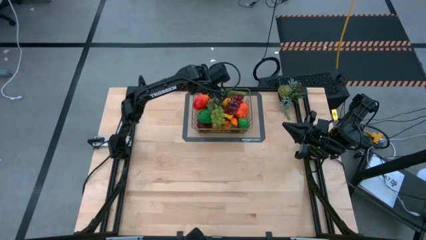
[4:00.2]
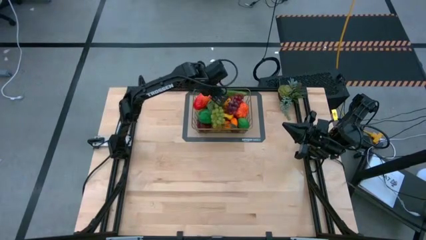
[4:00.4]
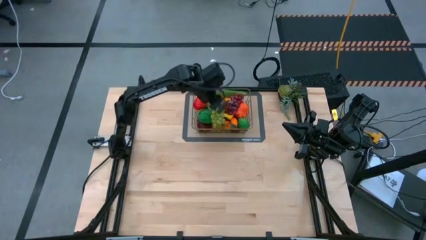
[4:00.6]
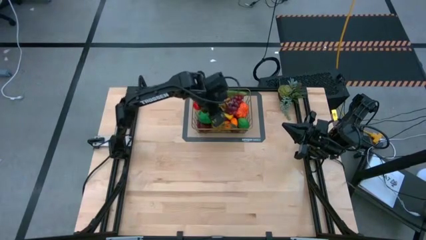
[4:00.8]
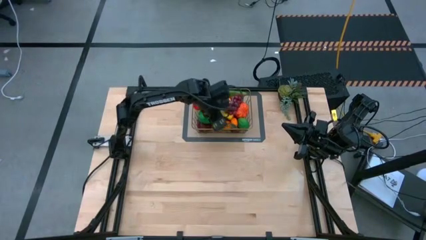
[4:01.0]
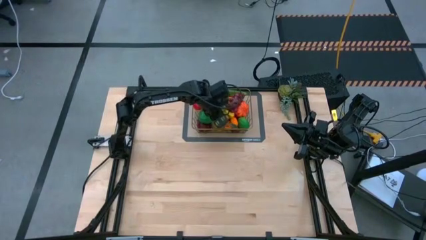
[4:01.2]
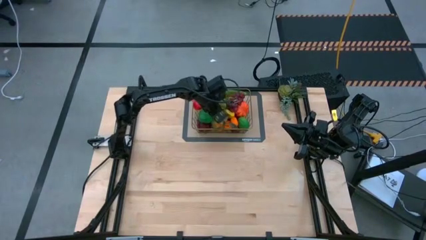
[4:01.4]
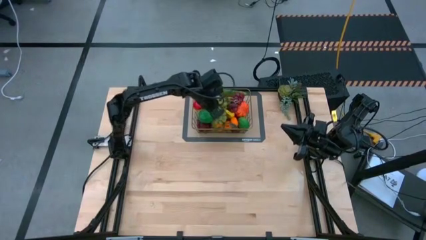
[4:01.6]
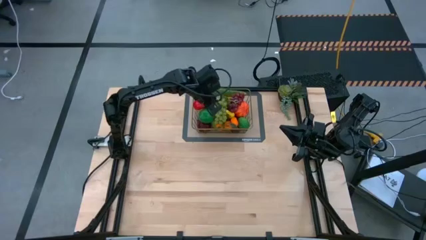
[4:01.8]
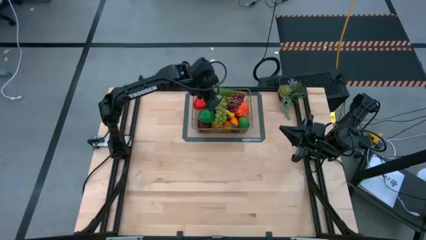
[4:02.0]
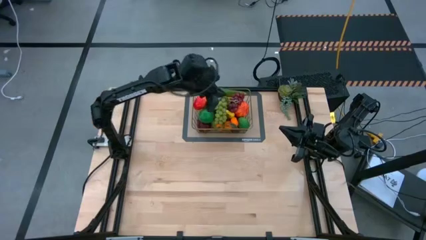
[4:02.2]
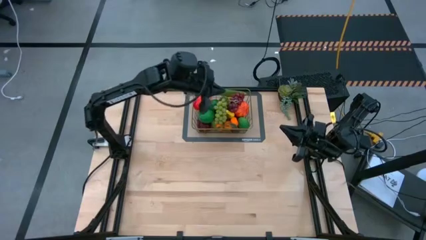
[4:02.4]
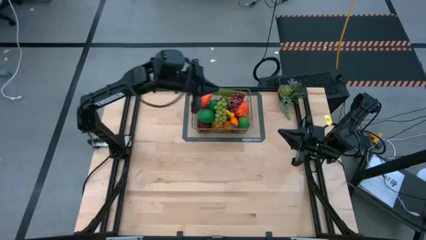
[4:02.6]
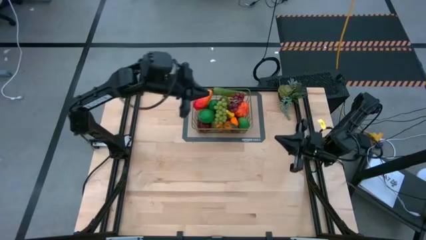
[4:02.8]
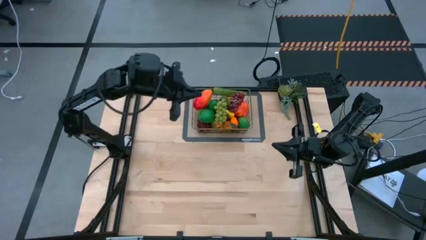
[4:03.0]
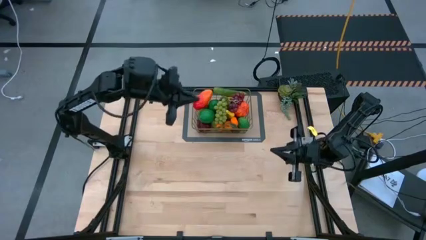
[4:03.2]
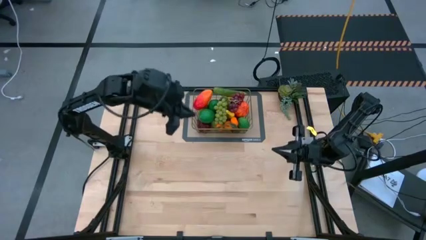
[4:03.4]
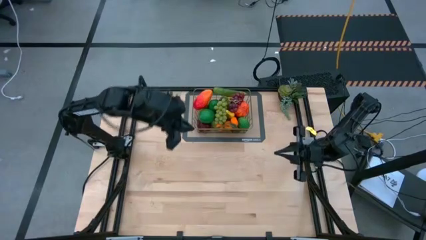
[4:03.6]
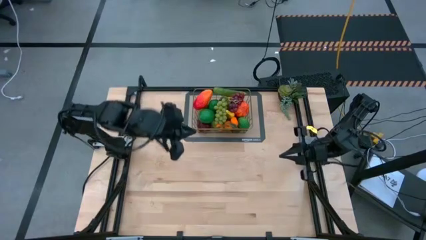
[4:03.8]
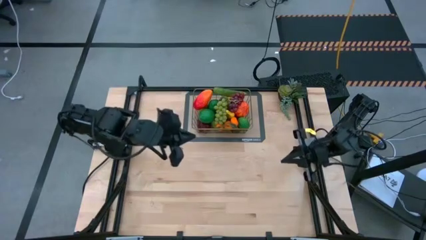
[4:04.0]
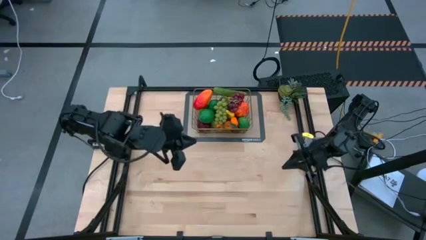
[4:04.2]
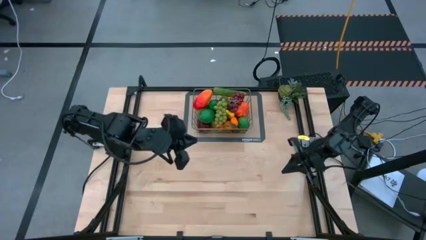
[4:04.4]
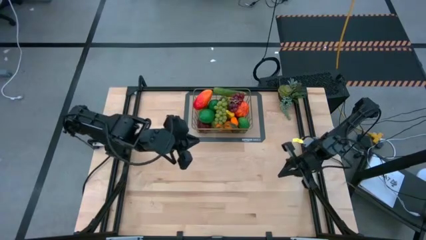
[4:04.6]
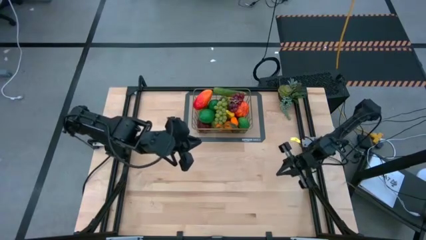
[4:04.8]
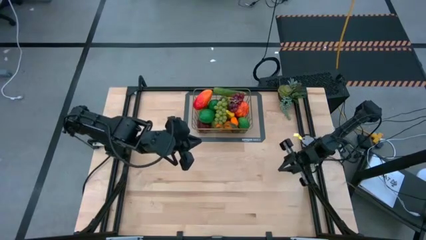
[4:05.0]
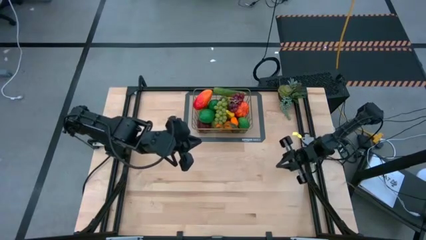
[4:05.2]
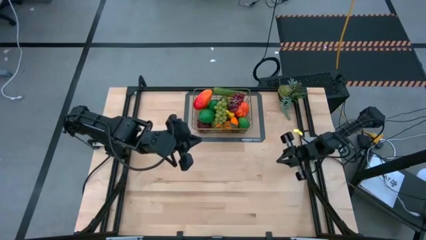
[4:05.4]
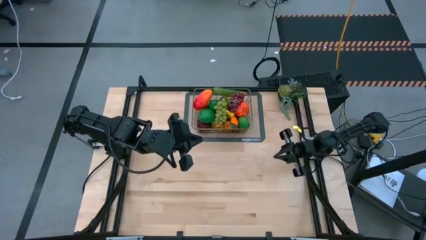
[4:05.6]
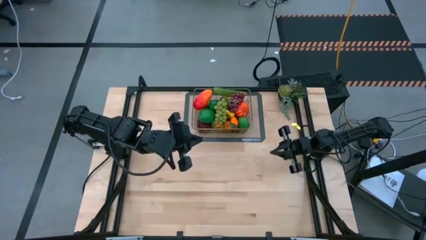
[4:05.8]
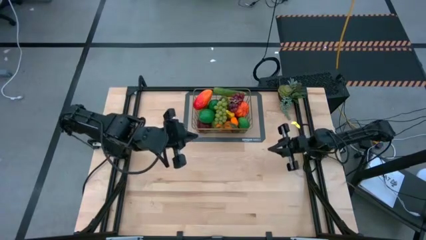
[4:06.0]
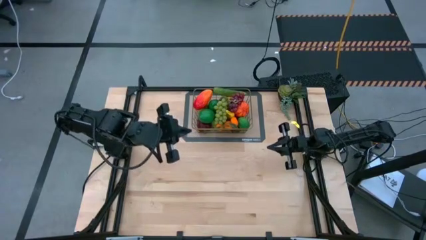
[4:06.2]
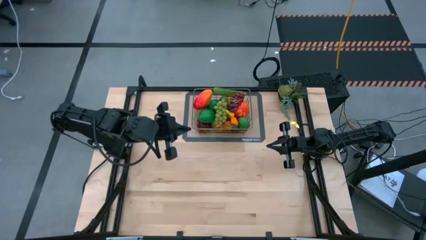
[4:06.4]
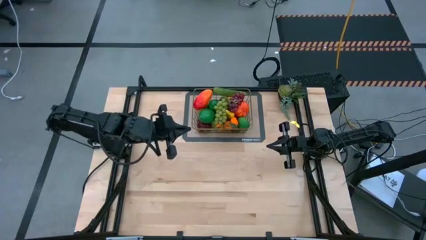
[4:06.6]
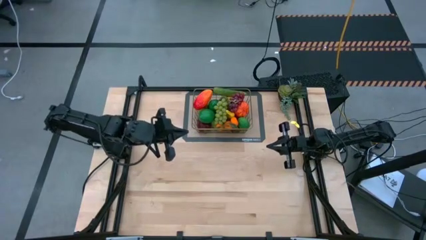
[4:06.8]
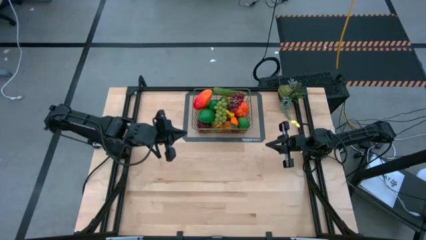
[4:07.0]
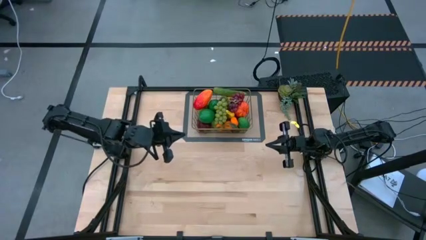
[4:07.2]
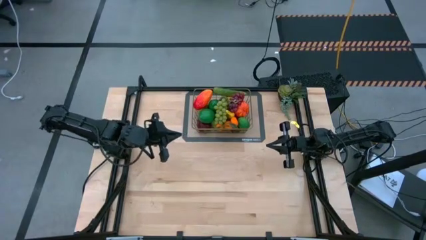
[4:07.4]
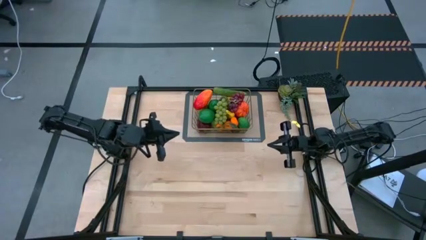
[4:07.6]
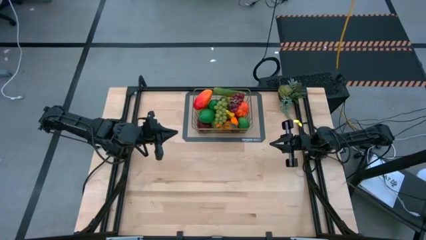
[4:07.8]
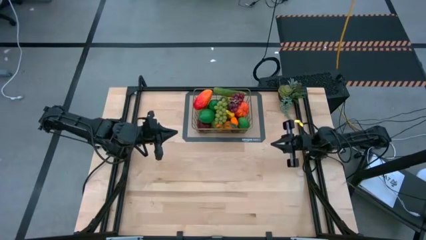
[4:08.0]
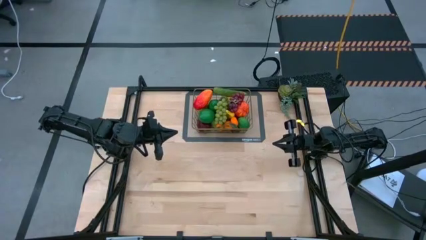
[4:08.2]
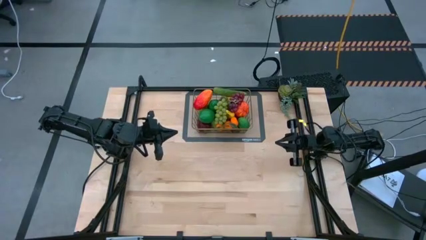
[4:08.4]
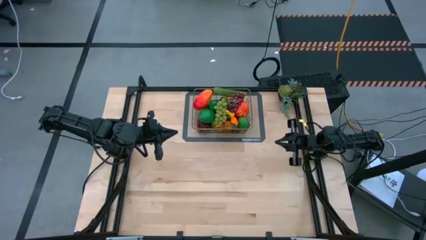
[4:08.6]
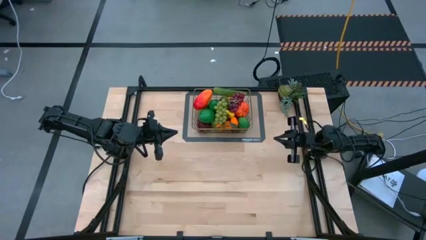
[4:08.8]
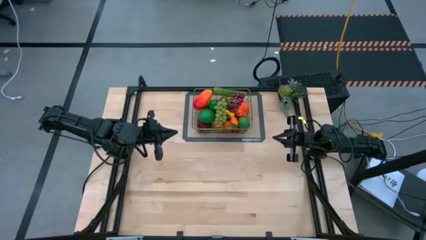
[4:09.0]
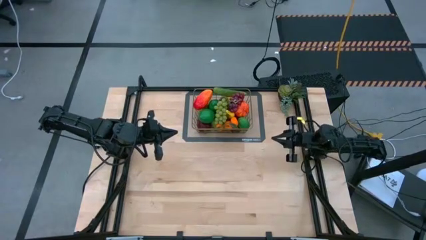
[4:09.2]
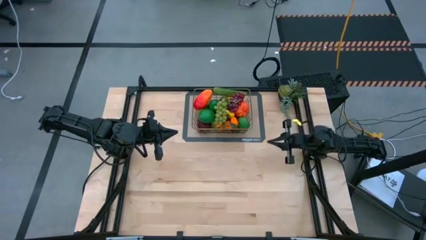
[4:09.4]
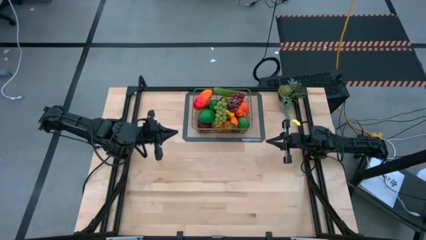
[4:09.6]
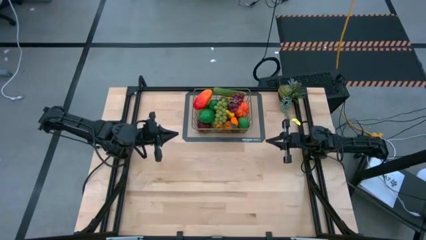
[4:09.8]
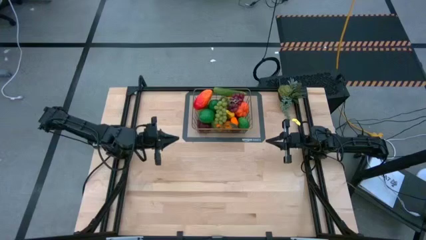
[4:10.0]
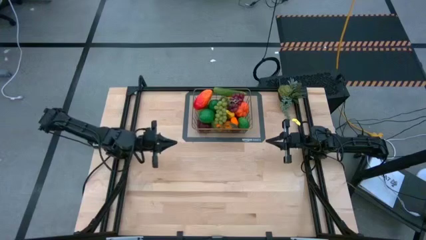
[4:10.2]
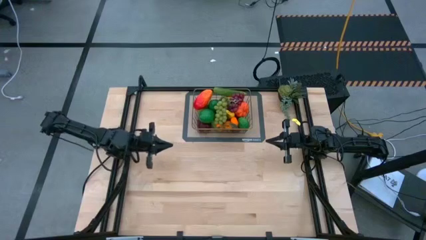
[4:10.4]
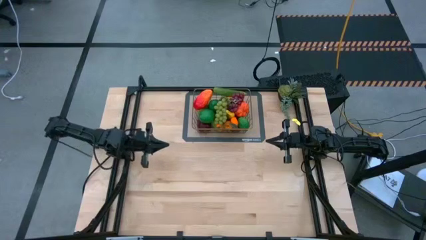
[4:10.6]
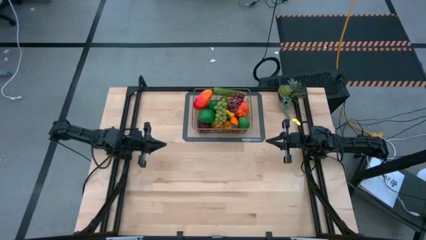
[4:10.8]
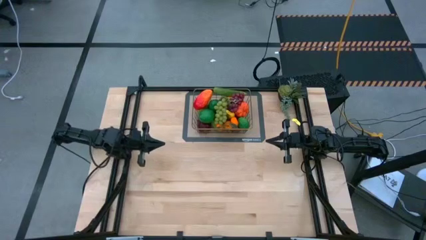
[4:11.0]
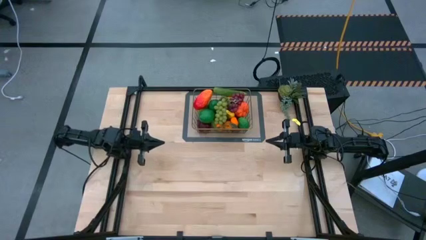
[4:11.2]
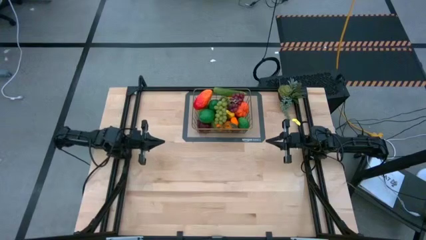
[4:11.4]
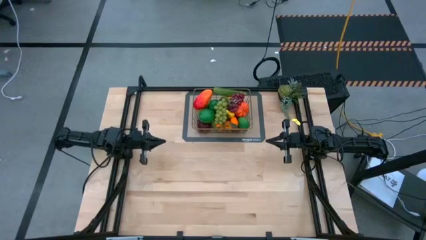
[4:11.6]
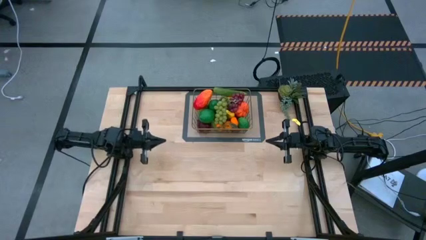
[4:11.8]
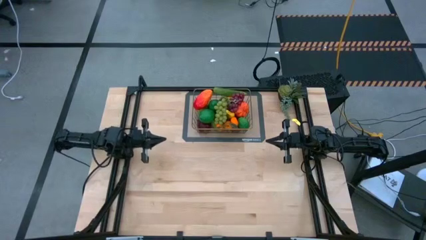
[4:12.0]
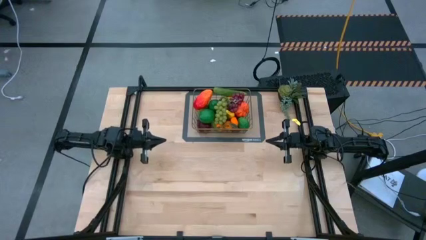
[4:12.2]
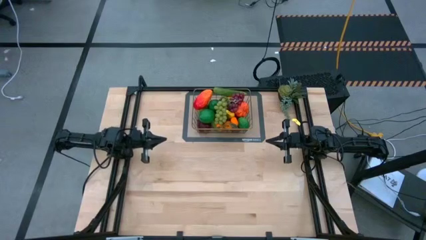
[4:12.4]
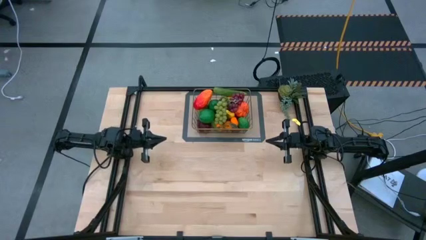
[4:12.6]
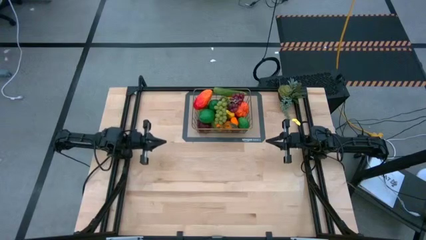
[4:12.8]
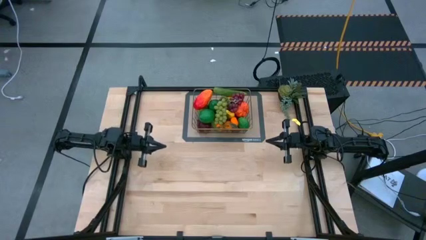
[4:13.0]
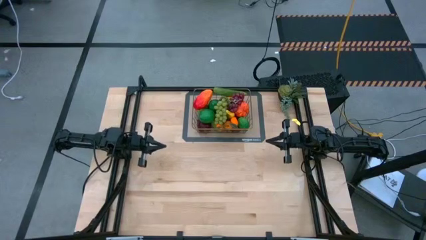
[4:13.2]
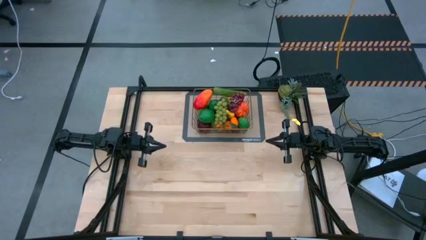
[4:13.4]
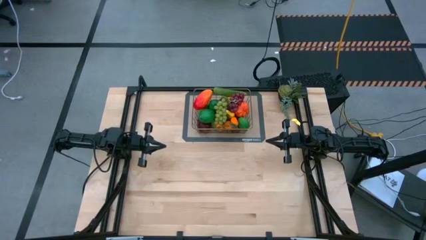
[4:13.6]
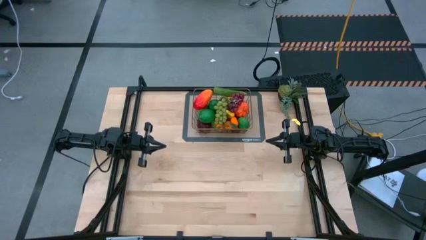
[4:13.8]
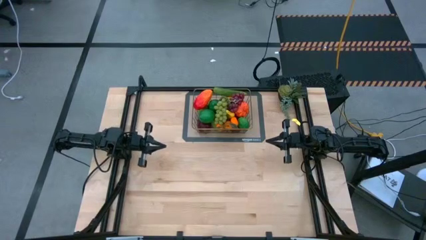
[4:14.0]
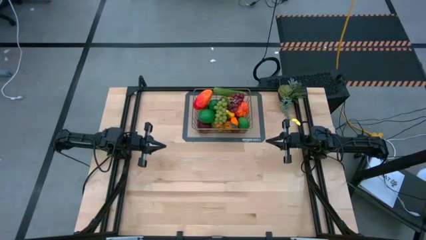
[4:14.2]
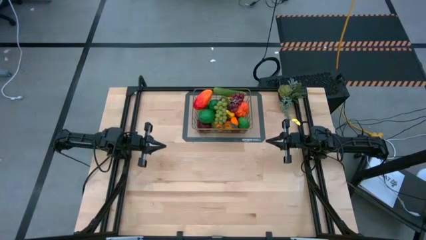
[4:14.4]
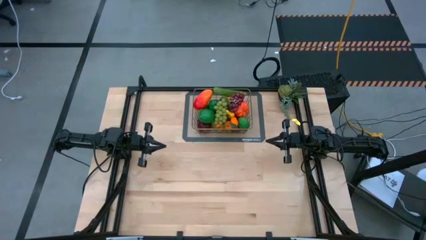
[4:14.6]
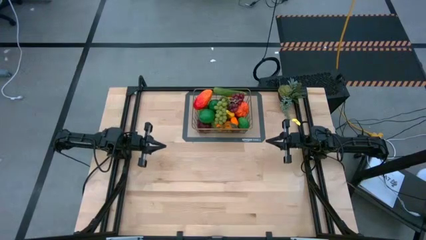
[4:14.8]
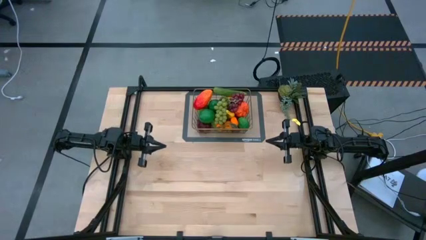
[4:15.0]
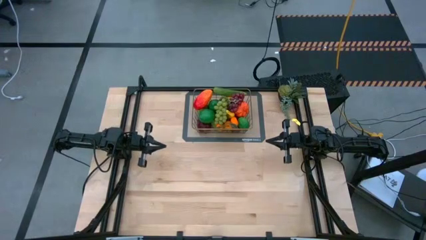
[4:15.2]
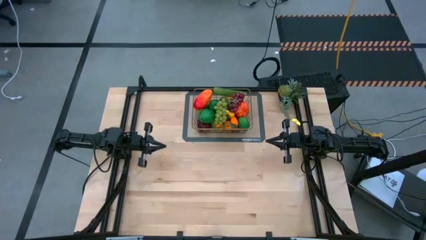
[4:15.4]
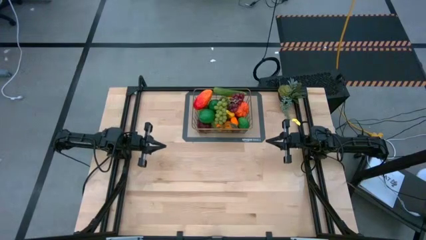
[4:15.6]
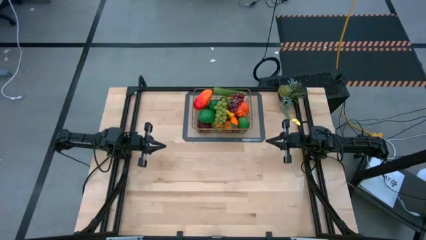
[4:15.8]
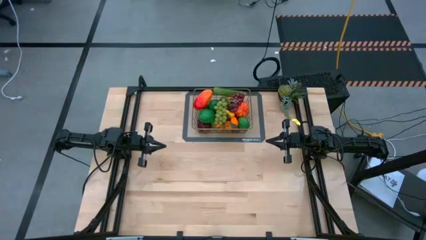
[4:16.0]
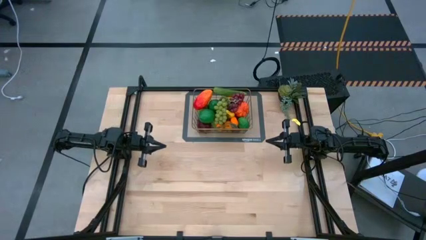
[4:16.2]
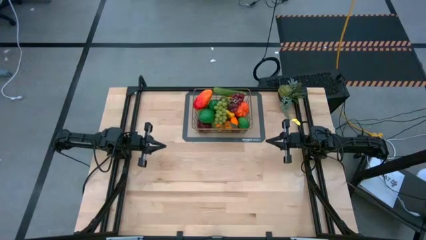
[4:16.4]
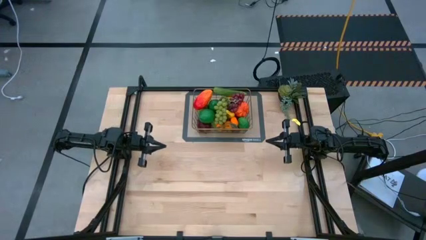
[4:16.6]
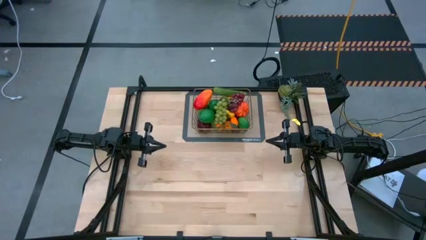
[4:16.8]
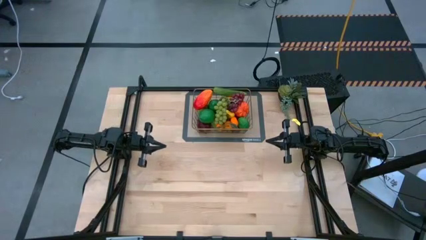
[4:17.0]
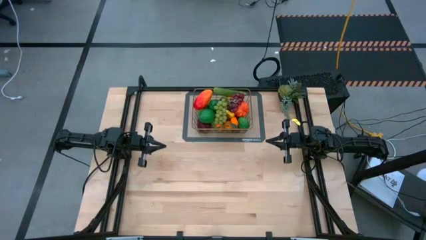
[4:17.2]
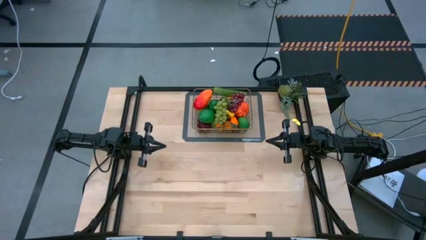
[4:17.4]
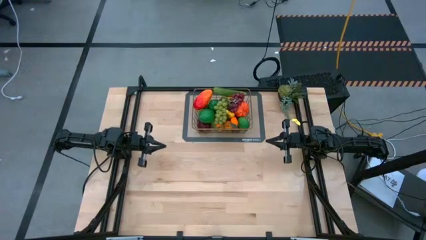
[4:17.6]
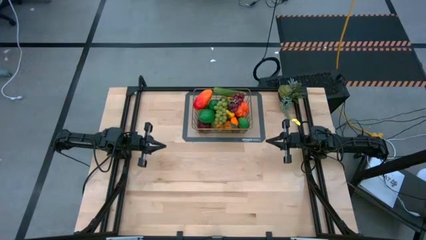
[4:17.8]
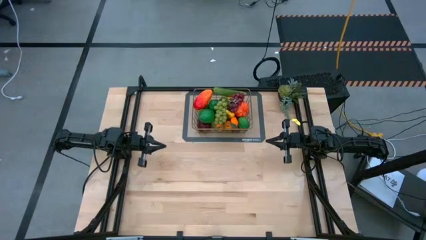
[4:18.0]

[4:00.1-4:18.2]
Task: Build produce basket
Return to Home Position
